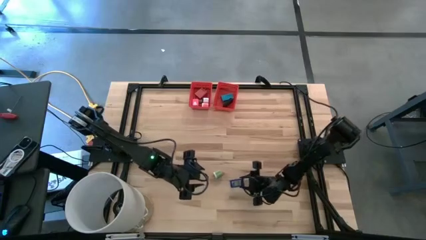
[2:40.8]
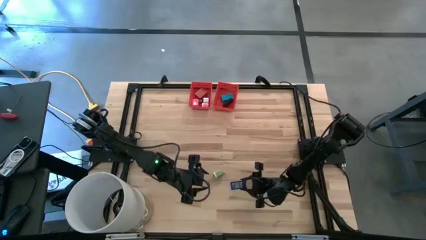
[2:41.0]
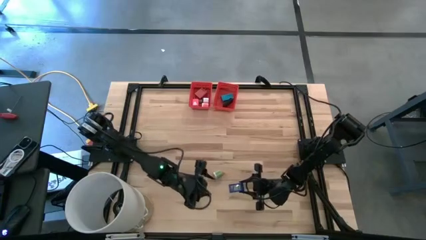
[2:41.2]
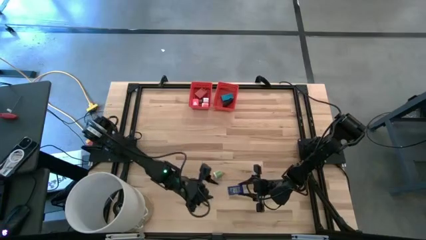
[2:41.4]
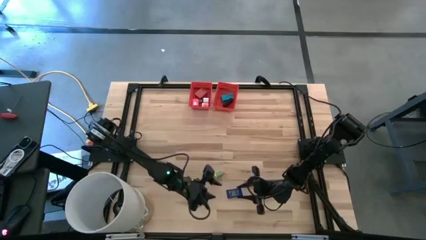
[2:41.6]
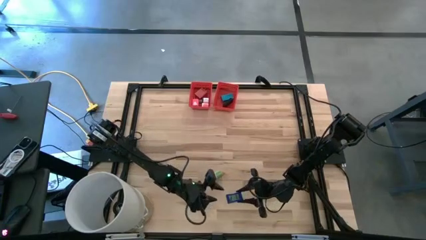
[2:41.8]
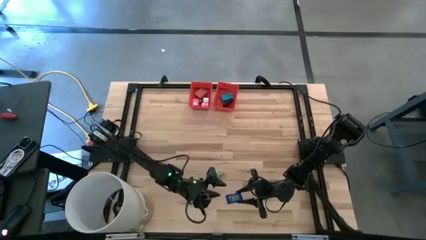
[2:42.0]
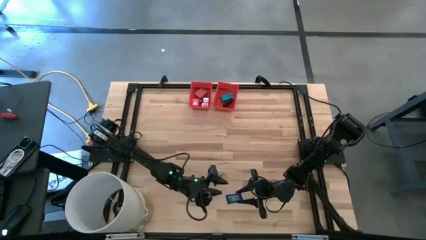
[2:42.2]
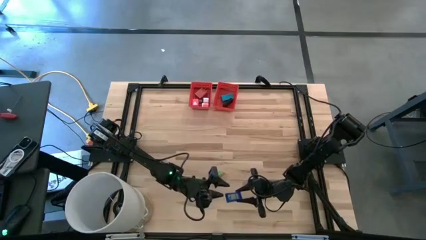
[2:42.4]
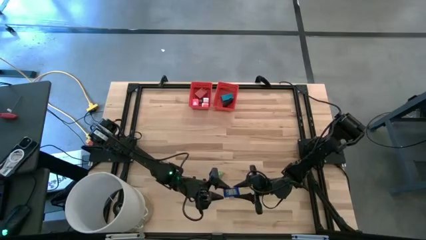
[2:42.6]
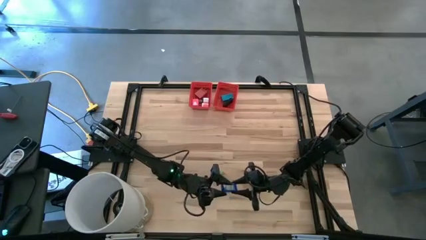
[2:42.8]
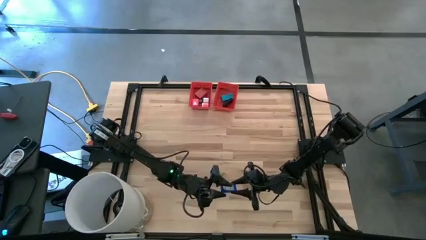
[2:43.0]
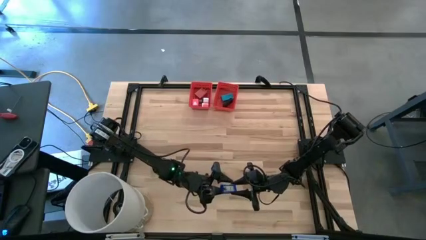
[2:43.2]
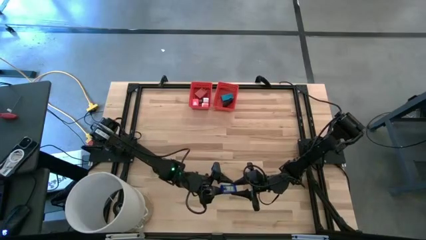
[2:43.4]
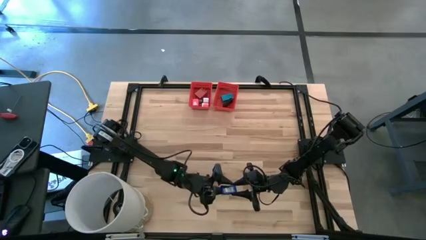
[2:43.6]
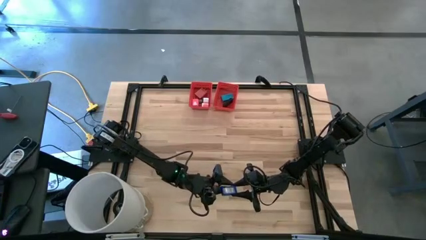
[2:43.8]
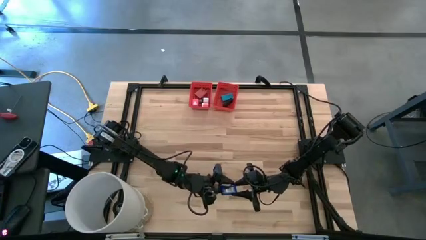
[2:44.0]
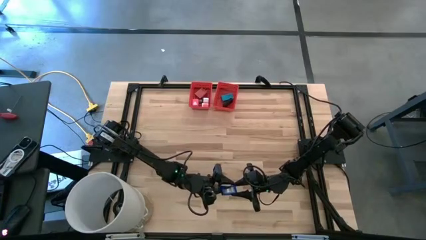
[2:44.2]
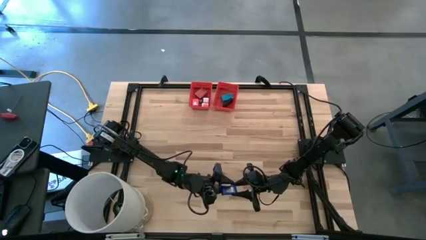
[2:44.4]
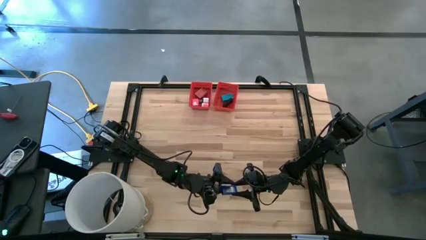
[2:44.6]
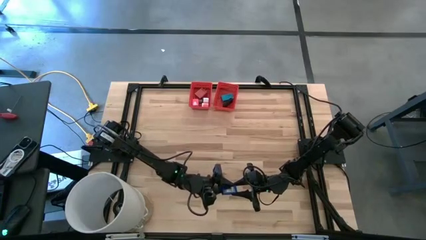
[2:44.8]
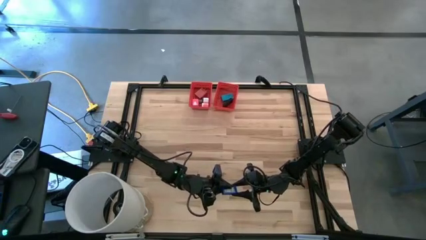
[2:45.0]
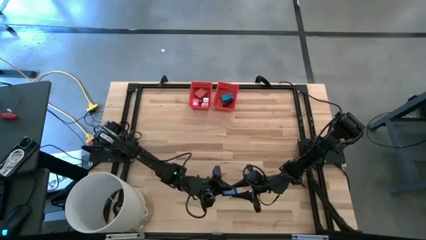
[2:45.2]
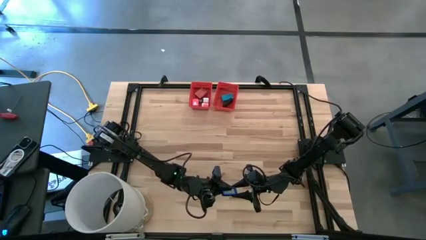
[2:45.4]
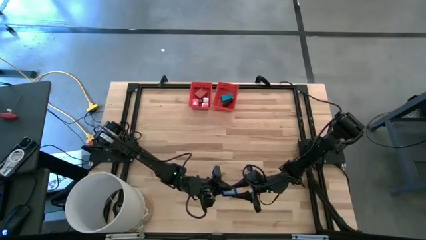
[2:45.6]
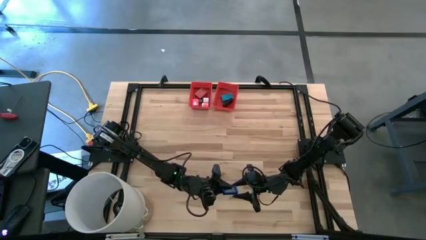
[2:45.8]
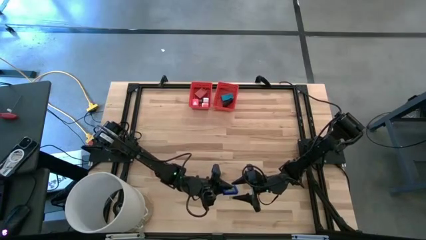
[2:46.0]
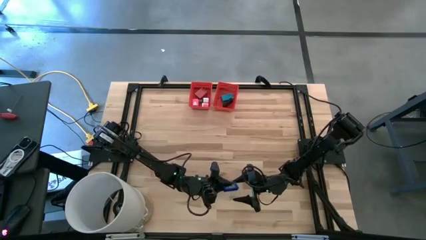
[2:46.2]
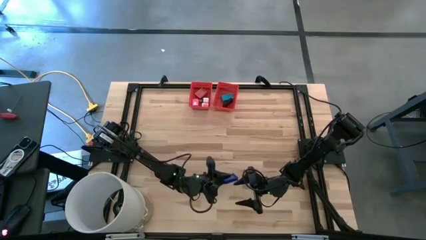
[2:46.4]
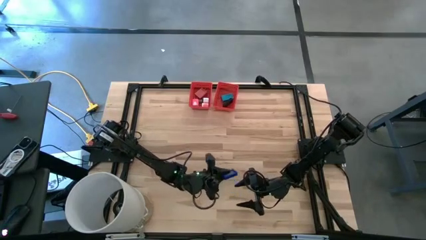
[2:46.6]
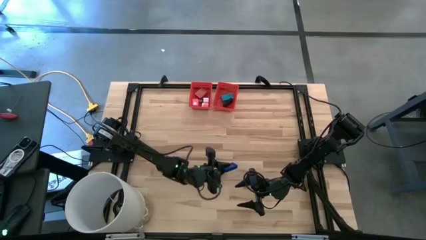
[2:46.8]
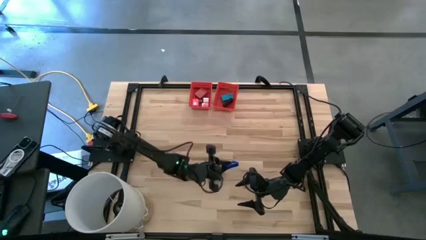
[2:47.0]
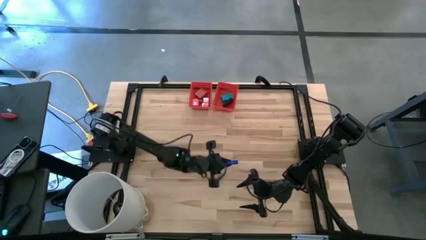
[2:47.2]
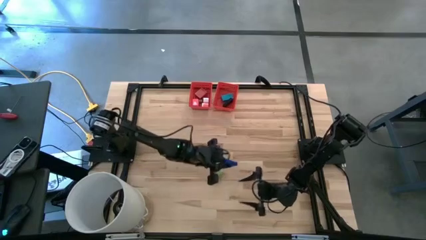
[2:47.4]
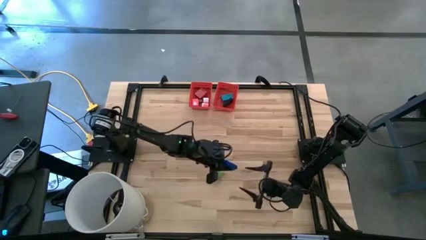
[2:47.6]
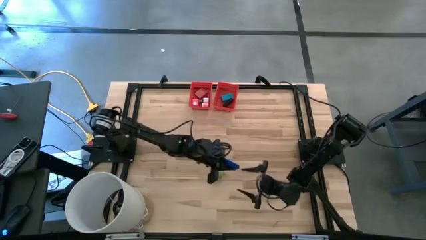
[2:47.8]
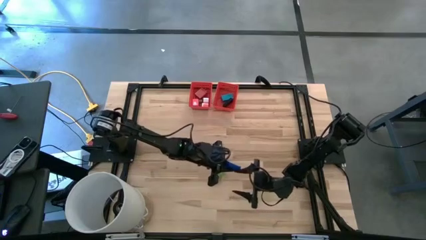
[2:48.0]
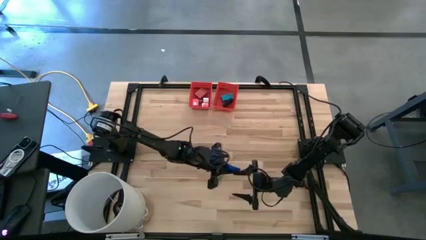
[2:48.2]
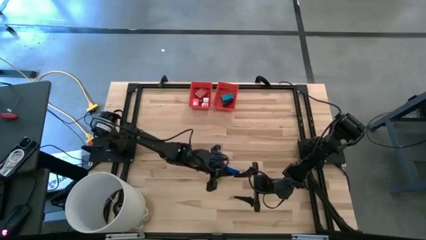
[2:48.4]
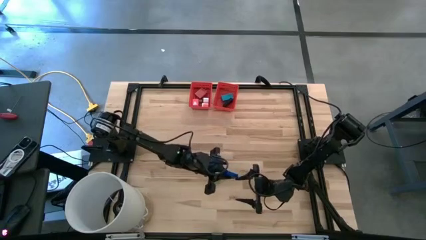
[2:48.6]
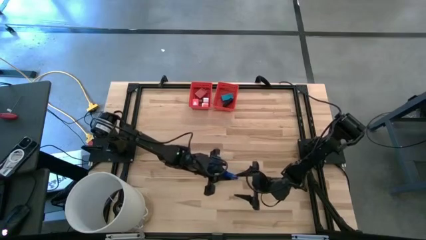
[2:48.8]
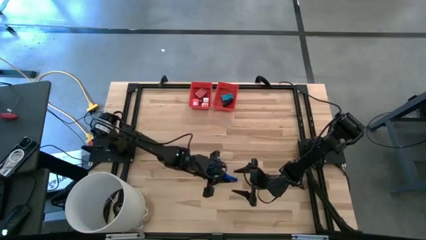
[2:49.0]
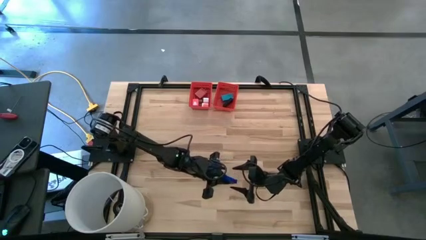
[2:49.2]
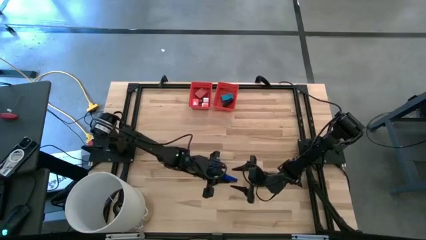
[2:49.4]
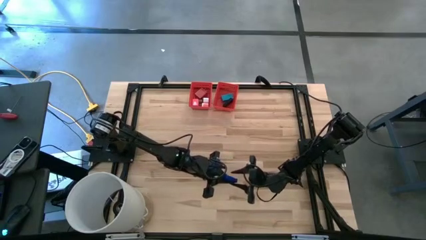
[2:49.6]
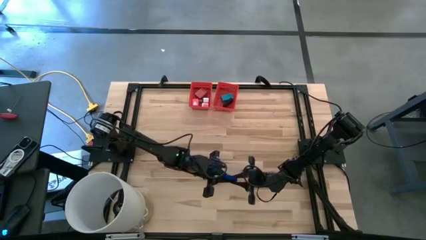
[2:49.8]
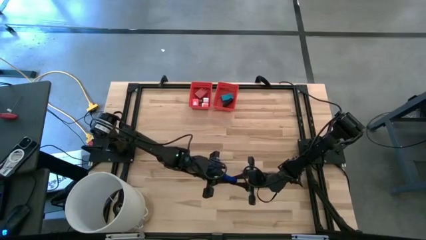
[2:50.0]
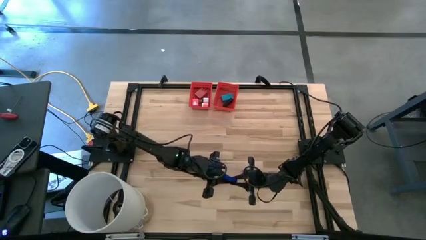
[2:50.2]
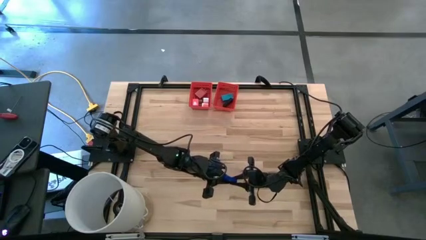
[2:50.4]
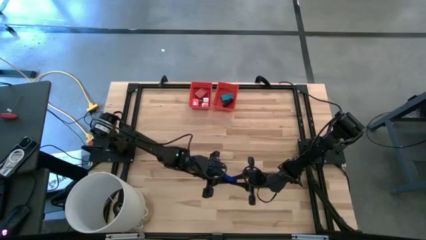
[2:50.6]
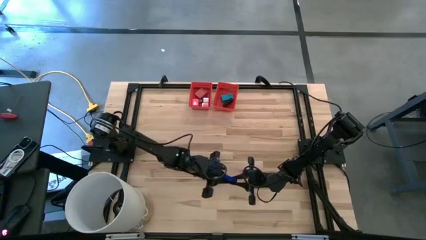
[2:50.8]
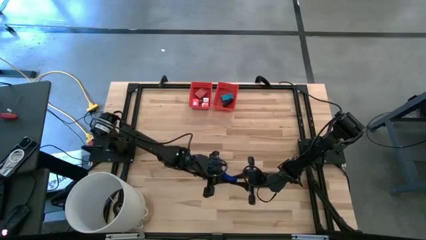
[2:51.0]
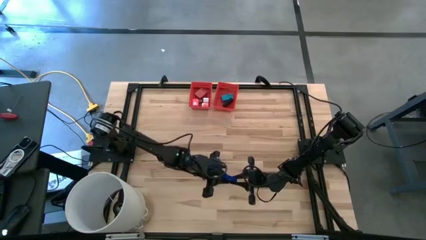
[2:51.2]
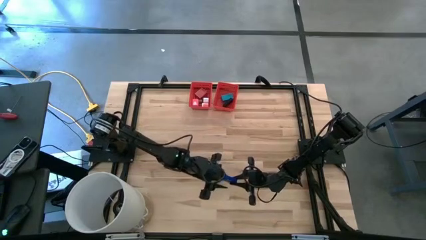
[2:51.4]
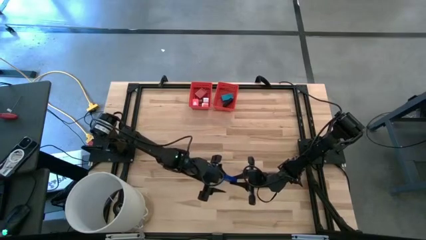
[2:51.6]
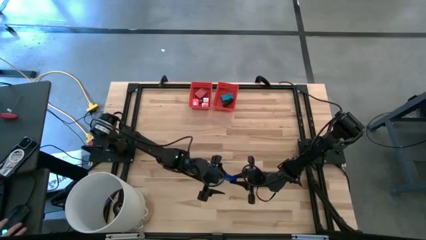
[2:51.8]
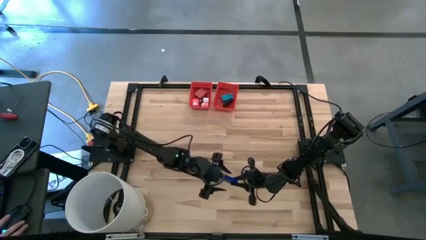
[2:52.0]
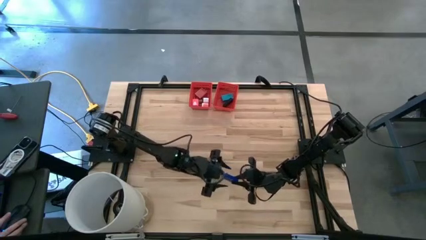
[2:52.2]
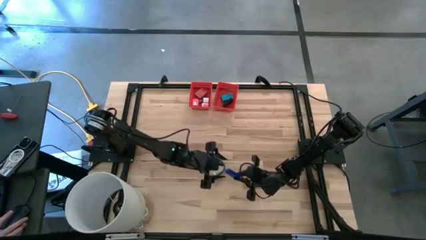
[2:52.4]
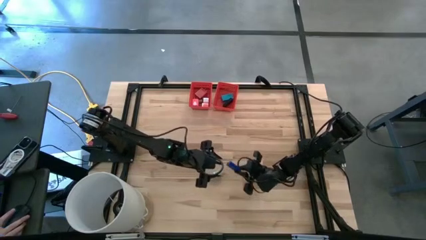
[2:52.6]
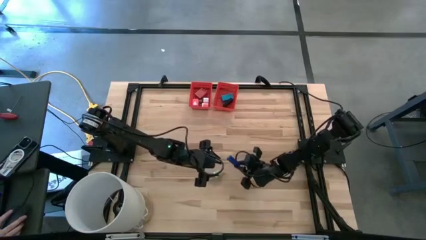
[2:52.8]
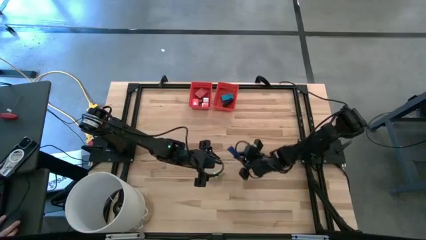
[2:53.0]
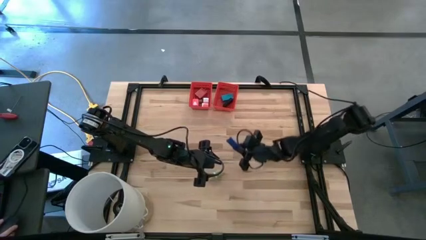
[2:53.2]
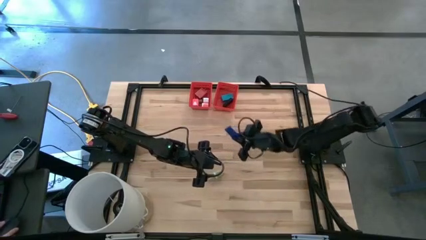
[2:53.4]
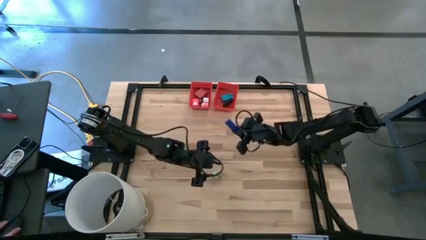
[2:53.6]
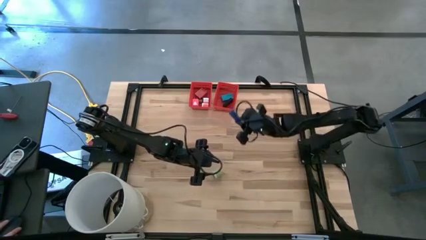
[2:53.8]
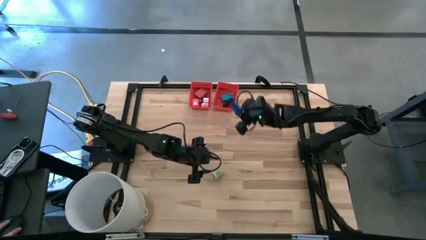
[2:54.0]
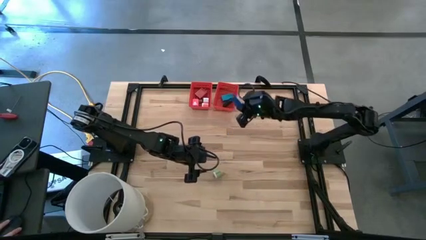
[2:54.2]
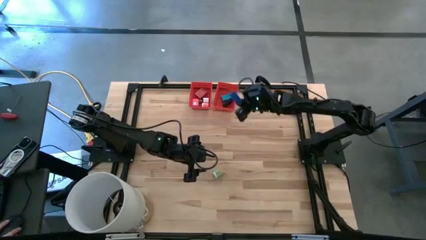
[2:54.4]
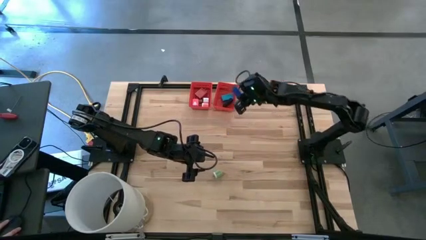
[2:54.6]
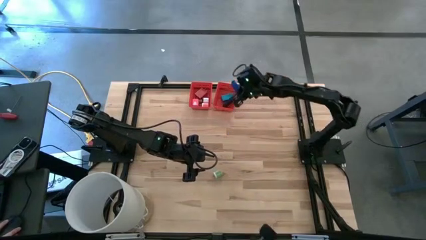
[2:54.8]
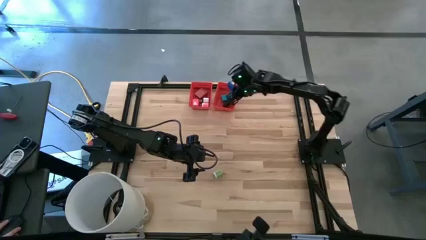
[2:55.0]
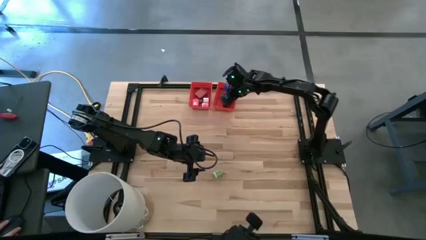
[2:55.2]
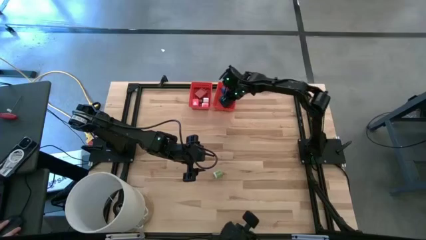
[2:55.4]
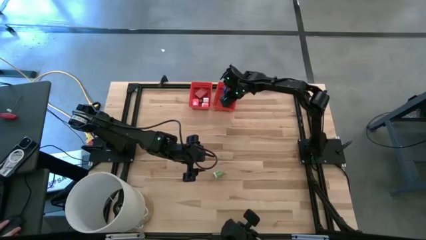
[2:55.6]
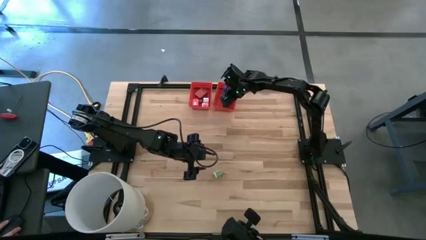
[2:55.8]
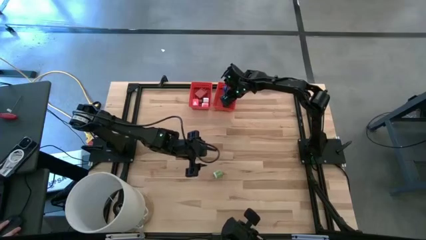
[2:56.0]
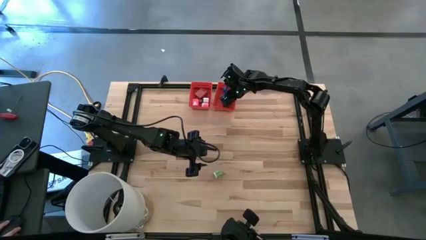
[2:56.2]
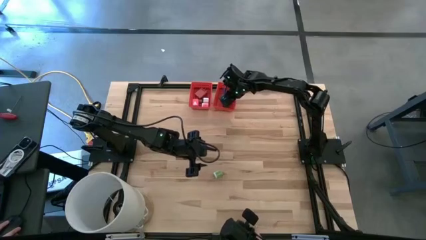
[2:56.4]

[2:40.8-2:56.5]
Task: Pick & Place Office items
Put the blue digital clock into the right red basket

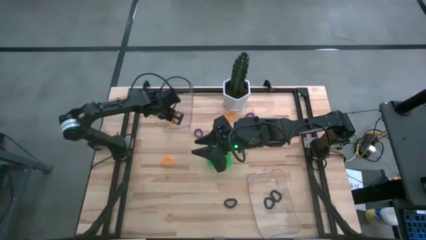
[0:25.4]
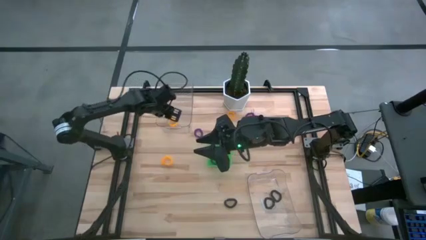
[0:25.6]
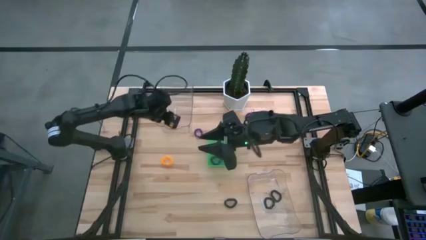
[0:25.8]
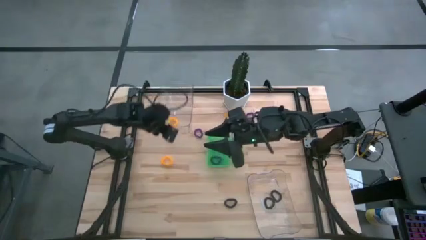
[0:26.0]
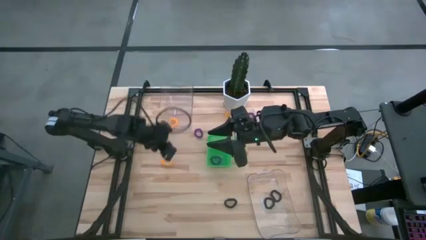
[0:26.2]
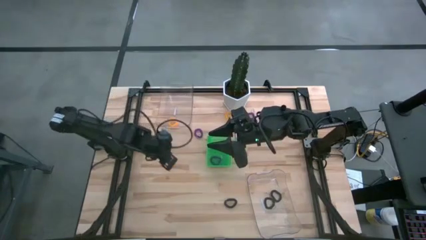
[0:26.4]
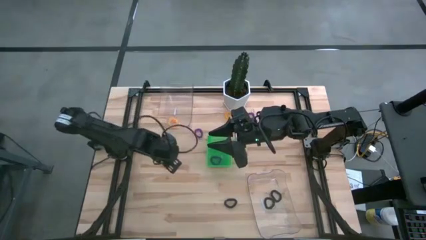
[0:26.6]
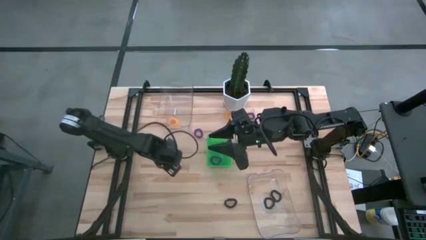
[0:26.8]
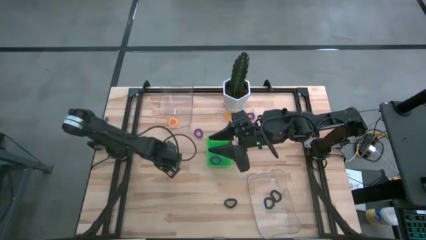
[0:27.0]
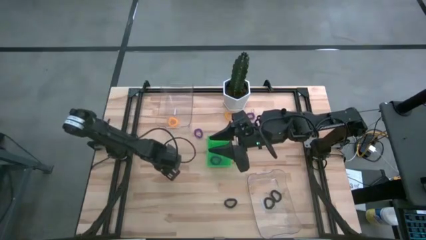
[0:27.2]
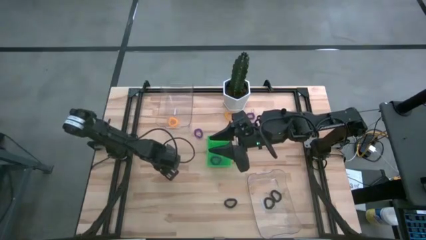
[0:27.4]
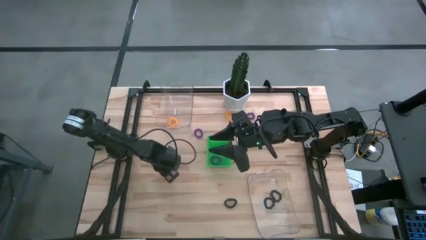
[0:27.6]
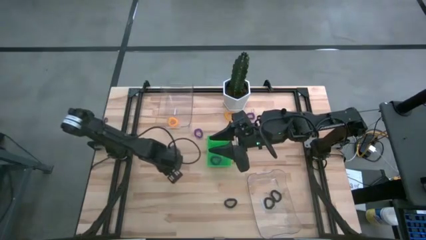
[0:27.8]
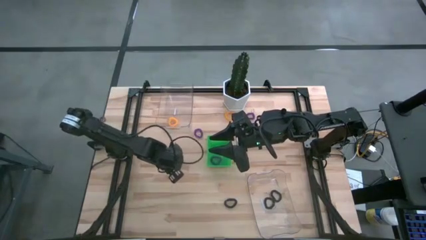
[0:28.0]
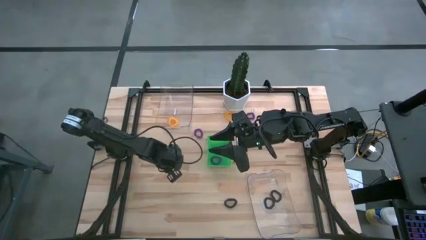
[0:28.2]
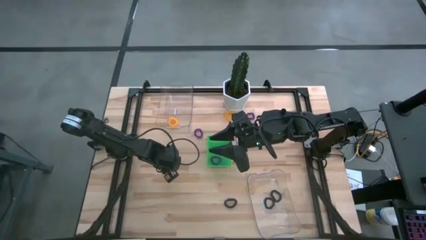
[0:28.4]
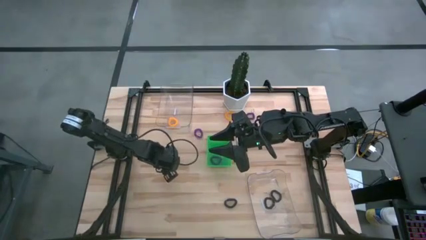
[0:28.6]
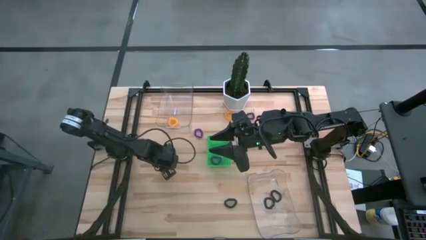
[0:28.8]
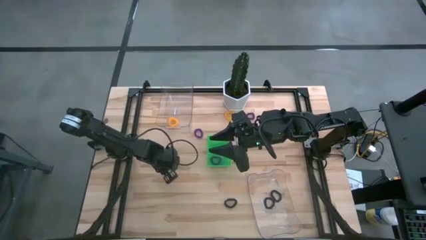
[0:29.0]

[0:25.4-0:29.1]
Task: Sort spring keychains
Put the left yellow spring keychain into the top transparent bin
